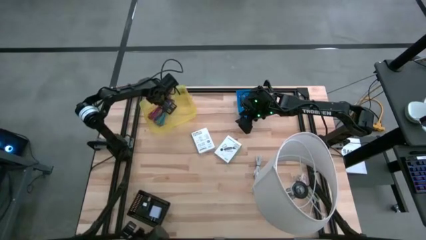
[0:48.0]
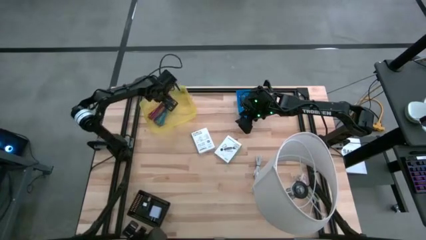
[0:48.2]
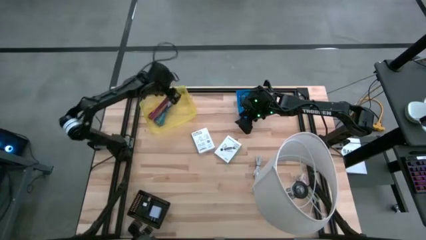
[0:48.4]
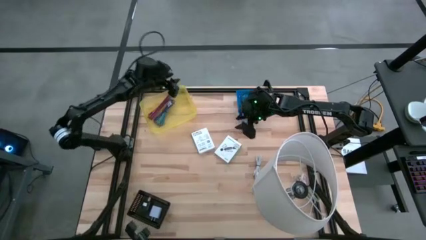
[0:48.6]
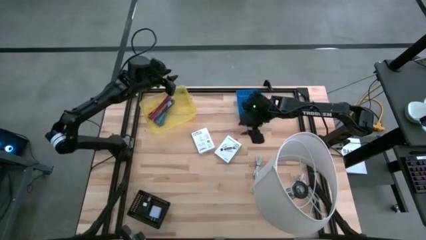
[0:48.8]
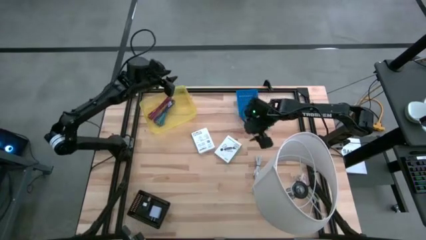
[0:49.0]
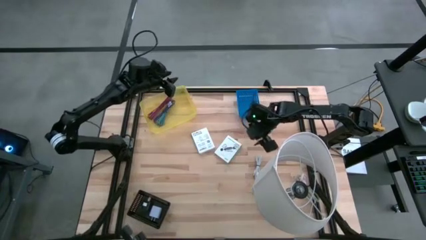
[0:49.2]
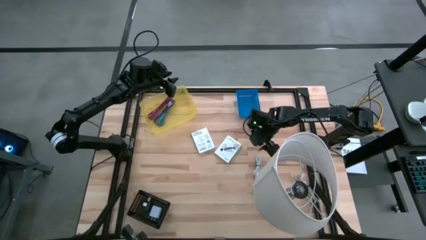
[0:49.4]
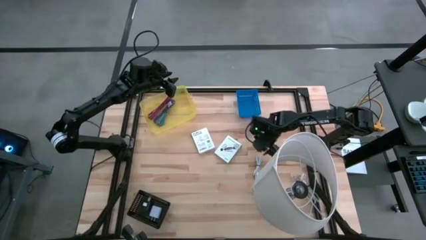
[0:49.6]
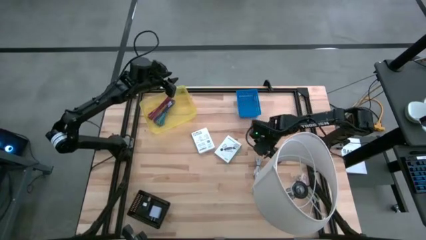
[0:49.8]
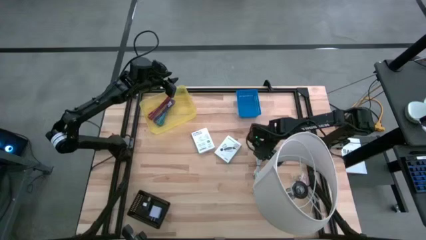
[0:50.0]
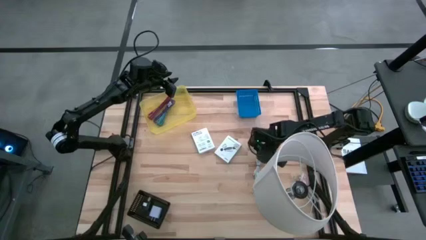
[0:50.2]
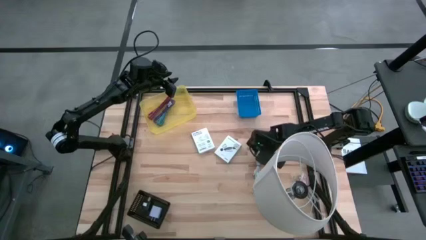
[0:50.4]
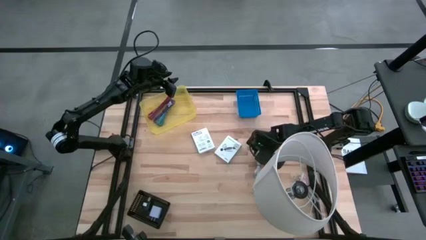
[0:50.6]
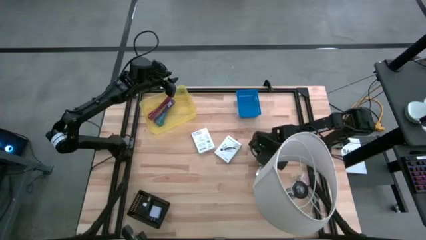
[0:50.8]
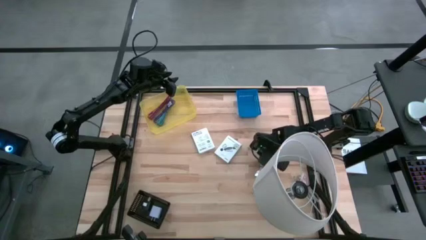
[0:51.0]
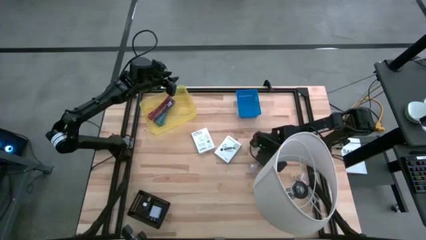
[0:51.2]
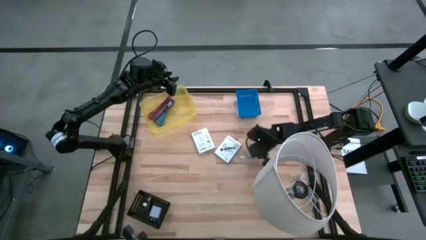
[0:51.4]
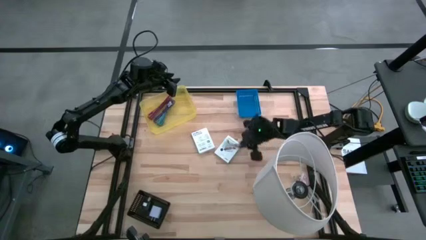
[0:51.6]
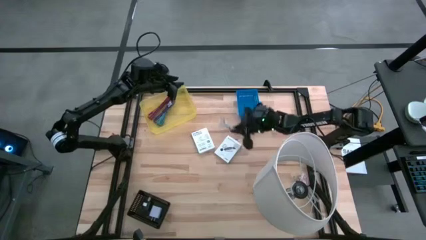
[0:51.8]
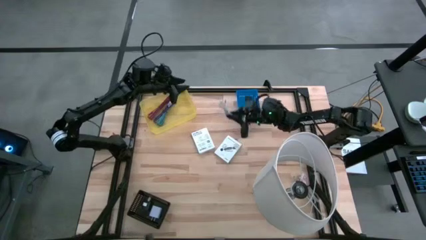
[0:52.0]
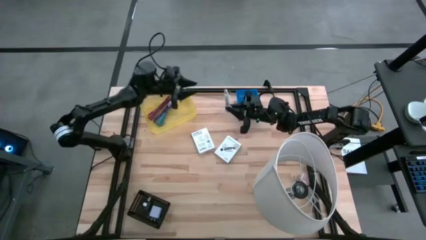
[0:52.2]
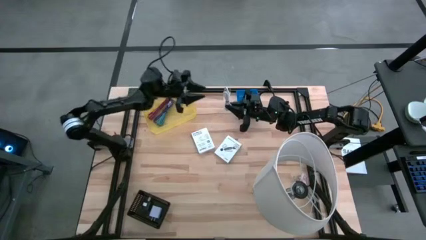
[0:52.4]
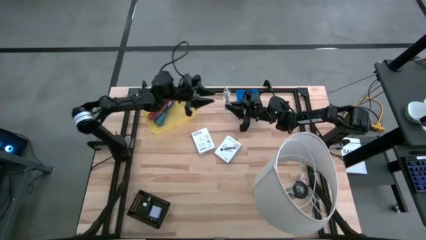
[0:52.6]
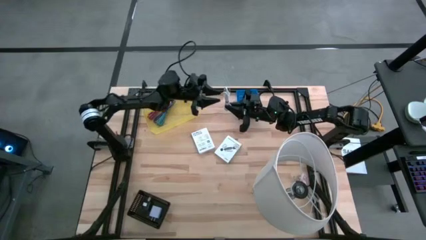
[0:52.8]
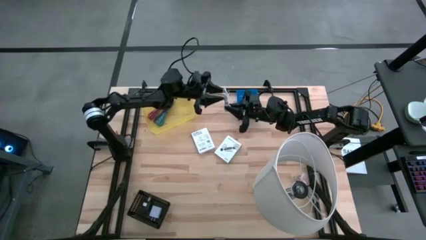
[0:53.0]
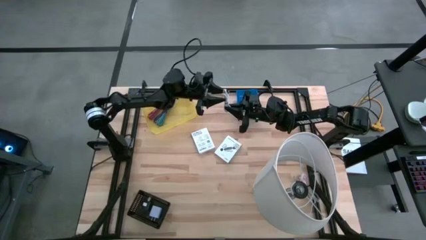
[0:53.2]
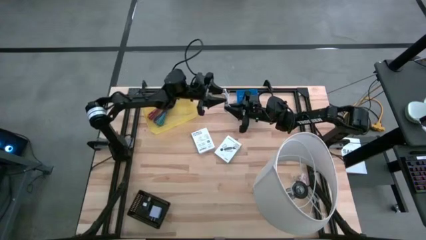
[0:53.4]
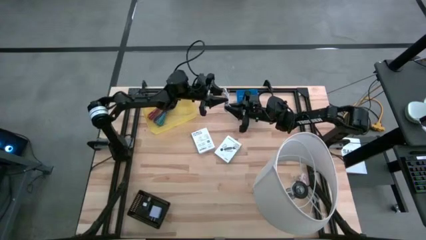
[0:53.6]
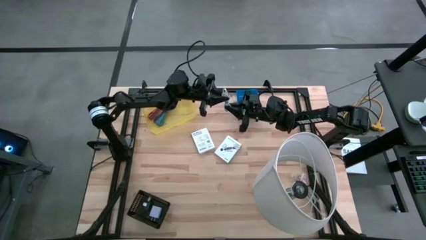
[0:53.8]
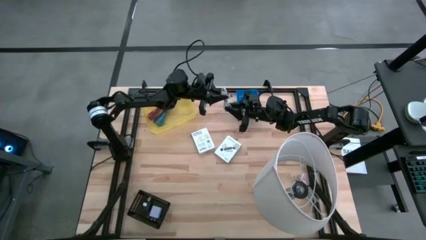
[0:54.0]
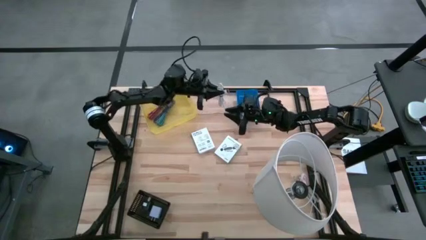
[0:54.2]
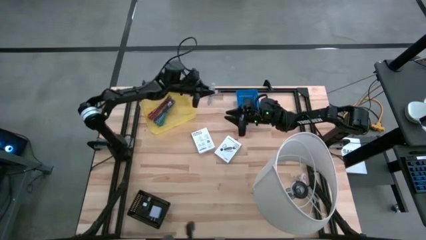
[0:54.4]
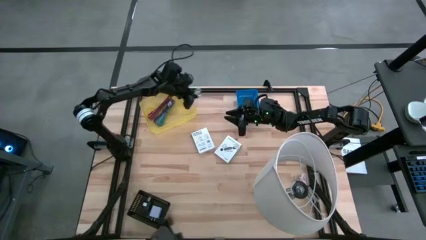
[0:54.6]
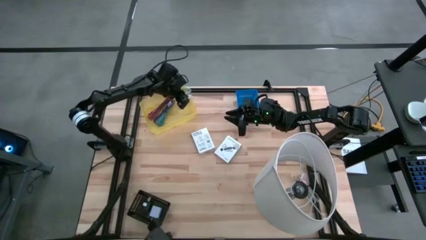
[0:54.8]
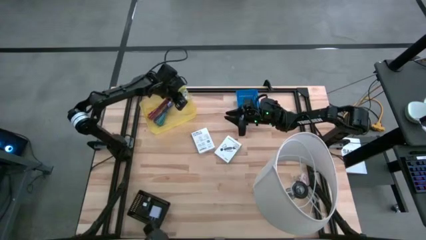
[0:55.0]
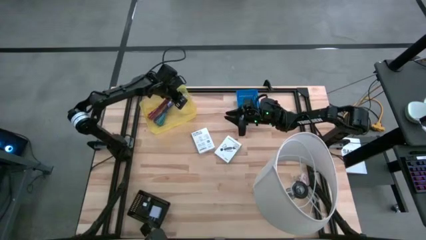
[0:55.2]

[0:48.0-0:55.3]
Task: Pick and place items into bin
Put the white charger cable into the yellow bin

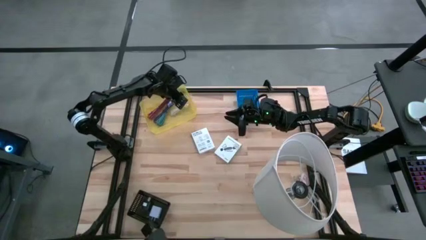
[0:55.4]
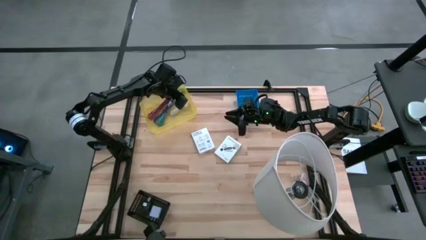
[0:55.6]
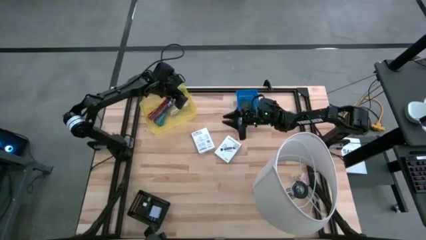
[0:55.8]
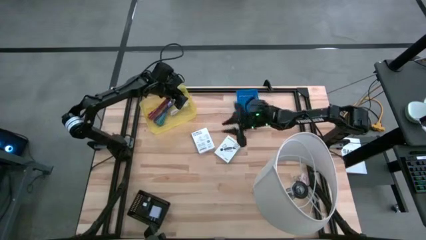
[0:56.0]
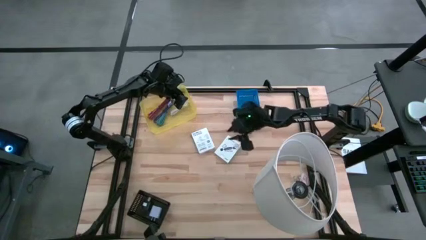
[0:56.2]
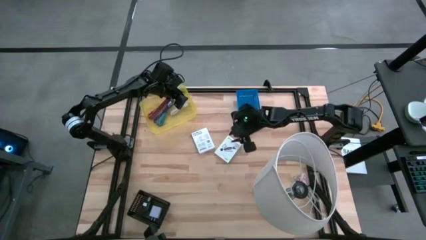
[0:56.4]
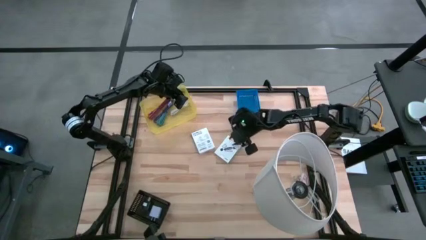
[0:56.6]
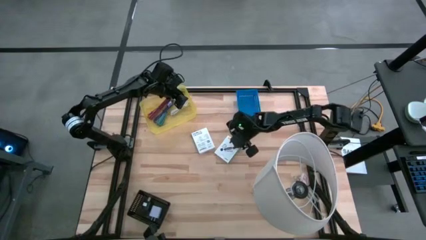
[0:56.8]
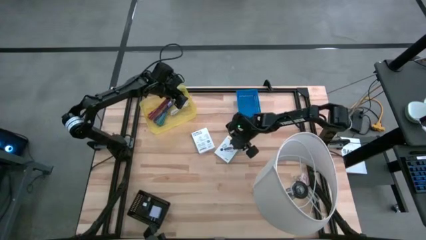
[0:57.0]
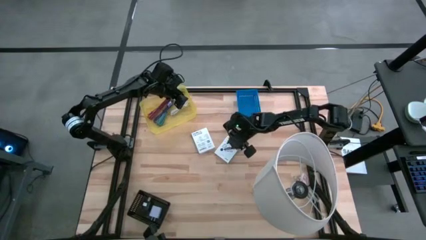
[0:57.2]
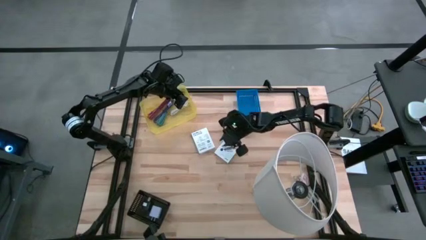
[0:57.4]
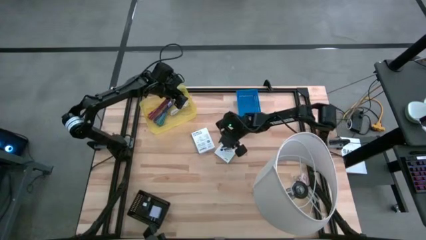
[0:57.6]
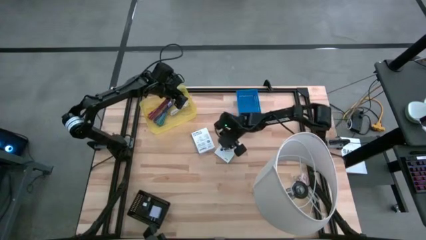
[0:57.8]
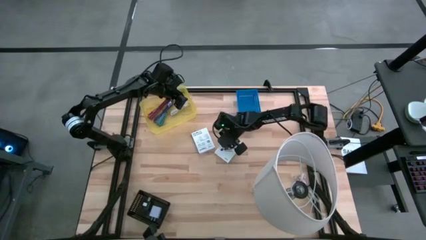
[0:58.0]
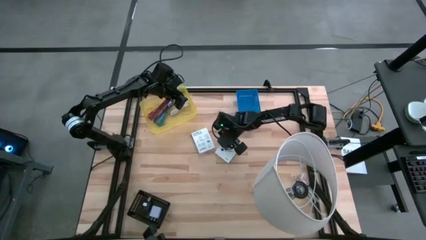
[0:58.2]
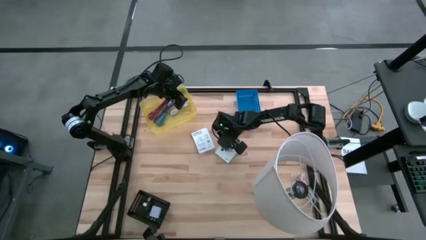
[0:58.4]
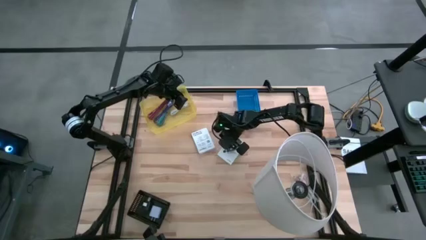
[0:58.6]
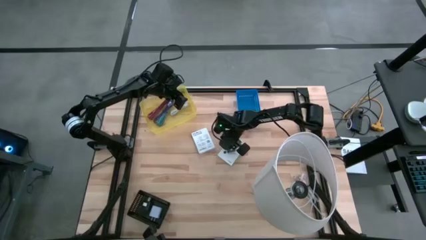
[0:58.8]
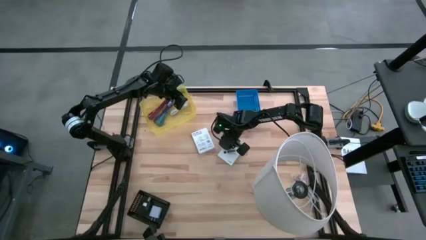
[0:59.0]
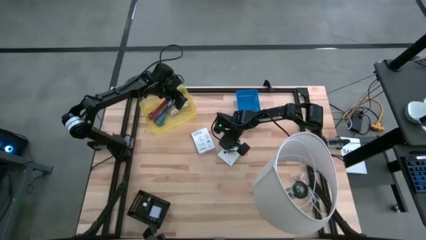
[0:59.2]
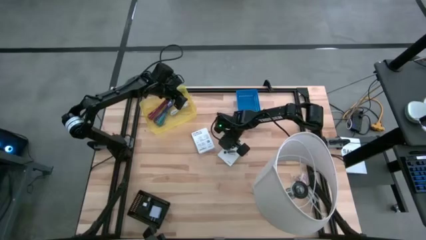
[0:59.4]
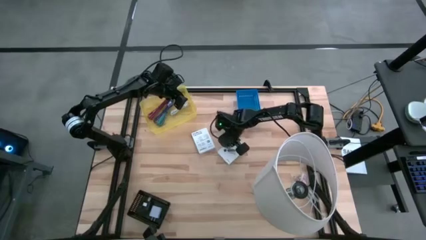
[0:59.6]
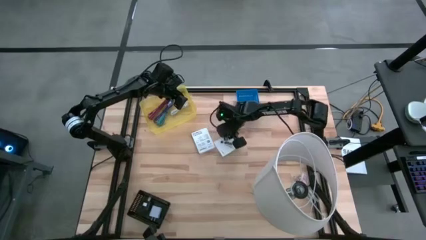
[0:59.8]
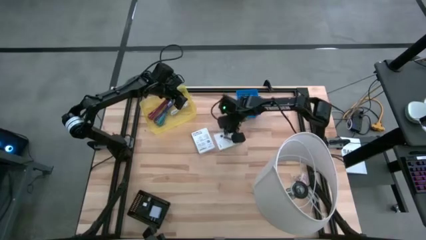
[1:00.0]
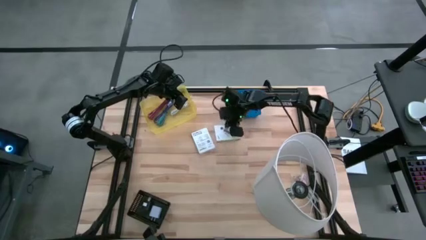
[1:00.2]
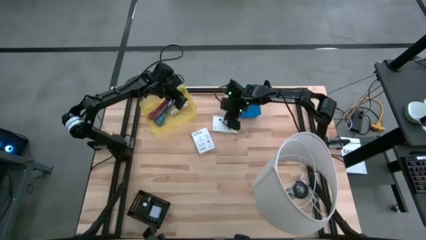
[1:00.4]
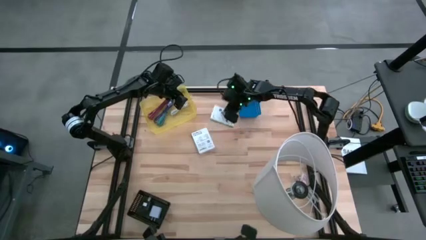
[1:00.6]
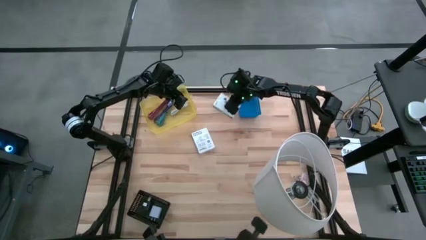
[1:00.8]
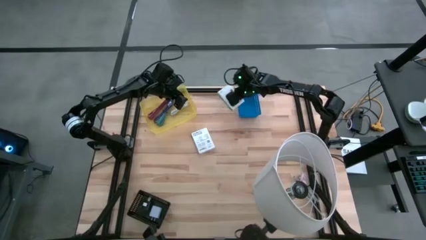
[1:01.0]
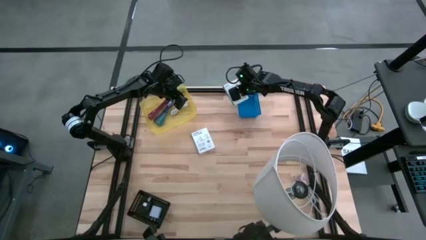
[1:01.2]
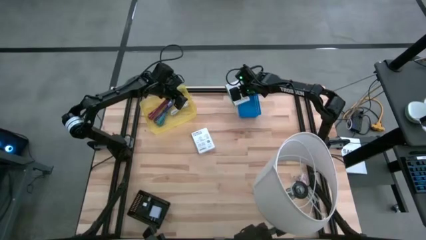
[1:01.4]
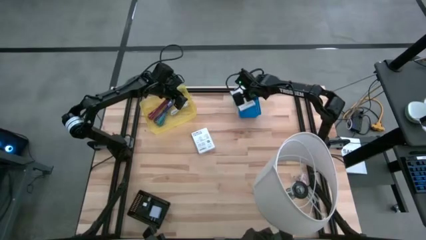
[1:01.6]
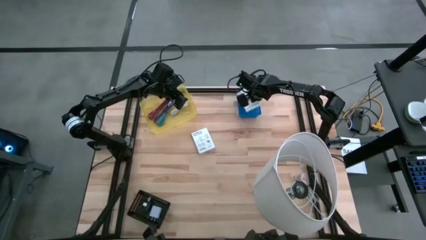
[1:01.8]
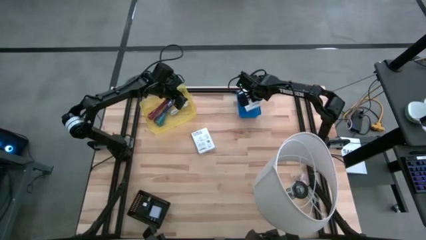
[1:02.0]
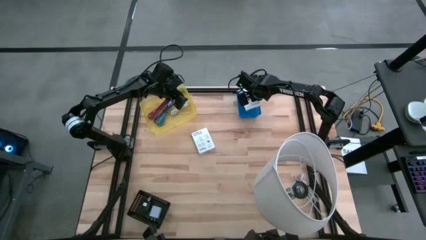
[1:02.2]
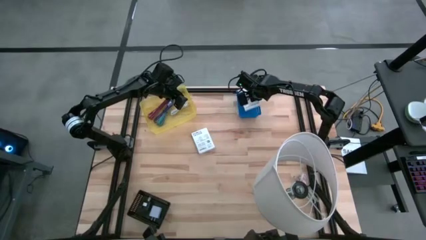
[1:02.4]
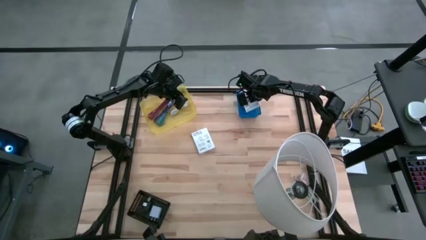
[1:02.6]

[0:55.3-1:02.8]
Put the right card reader box into the blue bin

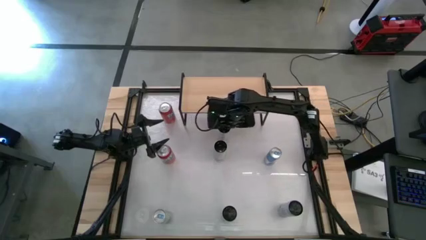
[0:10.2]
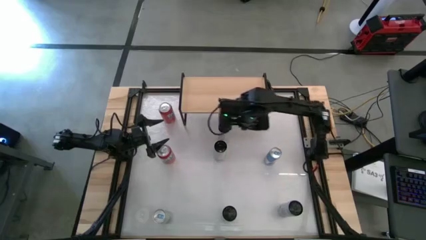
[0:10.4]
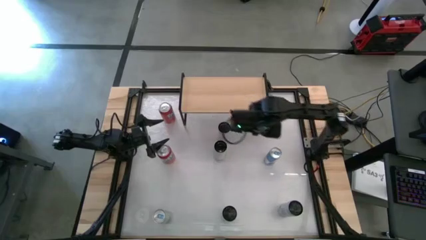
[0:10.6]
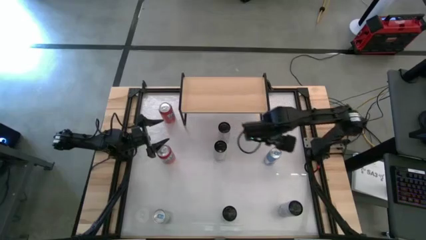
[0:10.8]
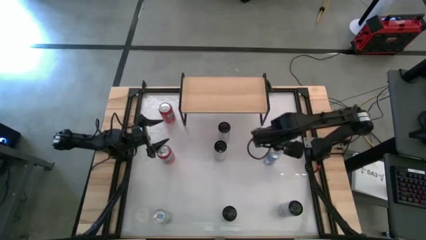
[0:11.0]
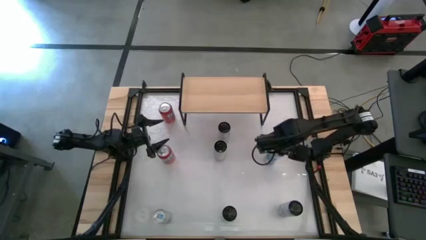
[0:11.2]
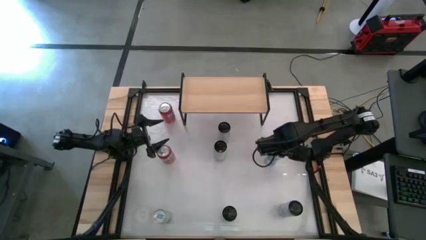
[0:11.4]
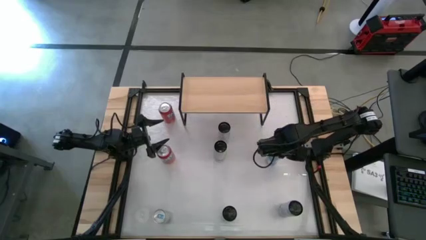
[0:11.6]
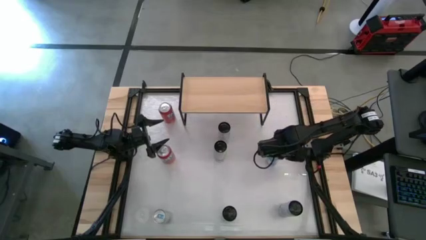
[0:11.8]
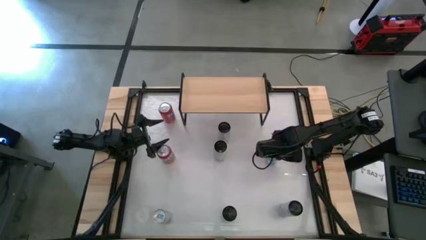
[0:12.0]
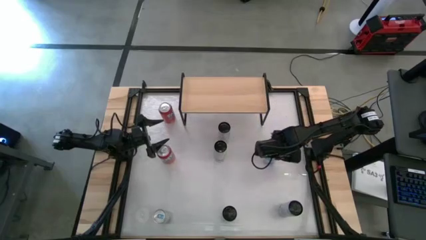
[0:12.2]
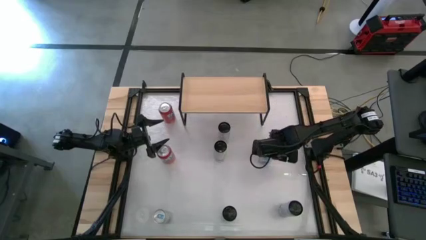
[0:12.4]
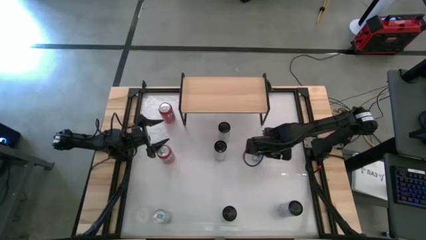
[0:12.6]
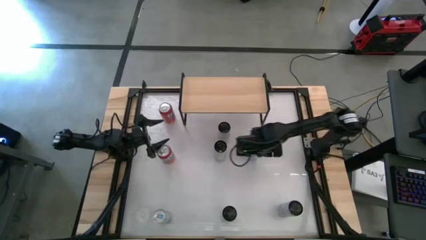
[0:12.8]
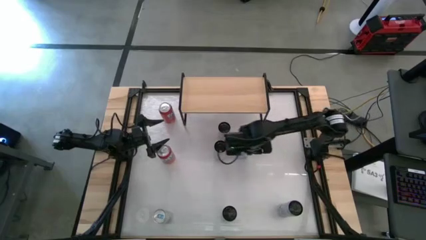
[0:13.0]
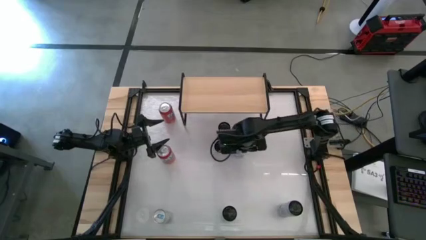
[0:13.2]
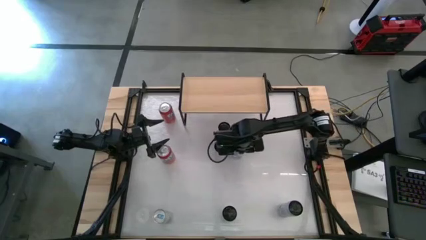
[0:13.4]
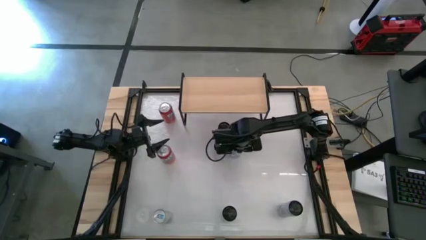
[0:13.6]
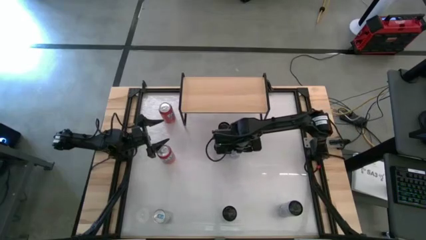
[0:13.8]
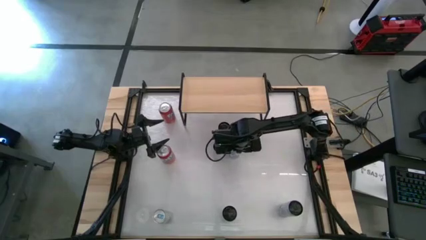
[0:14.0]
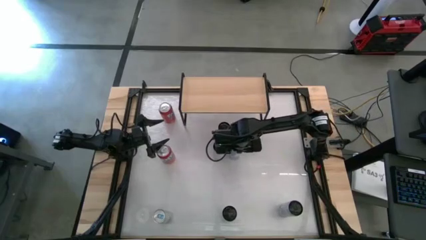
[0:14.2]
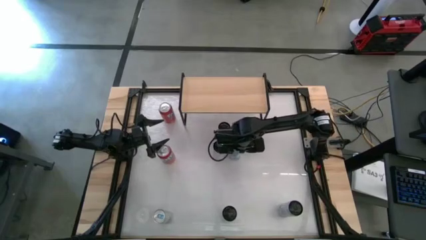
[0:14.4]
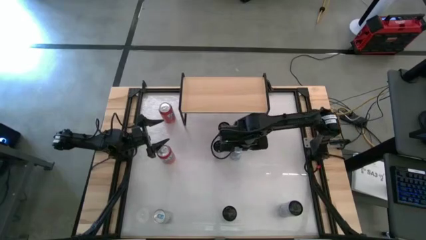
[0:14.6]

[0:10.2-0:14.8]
Task: Place canned beverage on shelf
Move the top blue soda can to the center of the table
